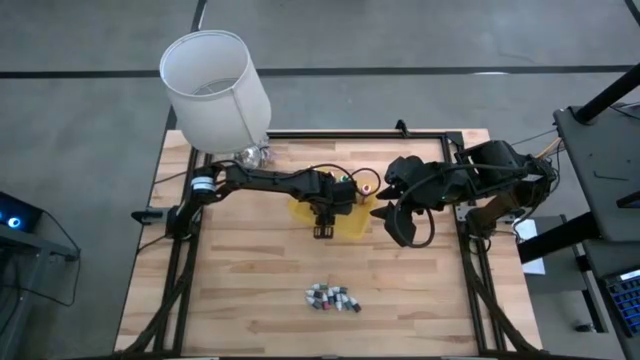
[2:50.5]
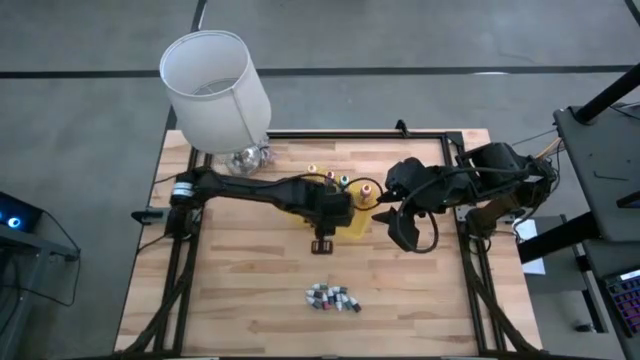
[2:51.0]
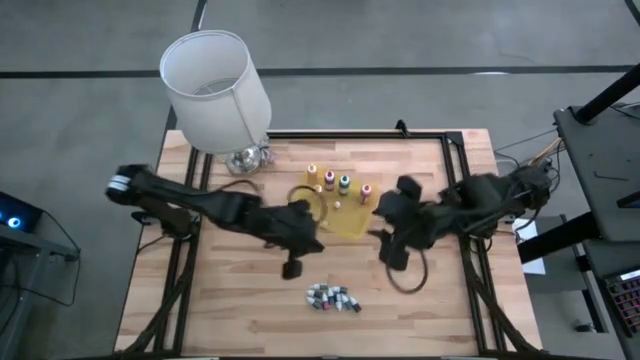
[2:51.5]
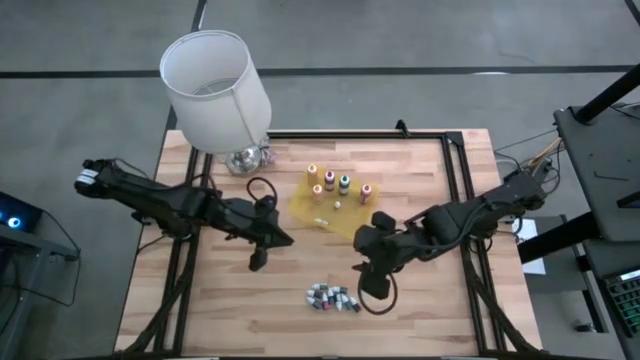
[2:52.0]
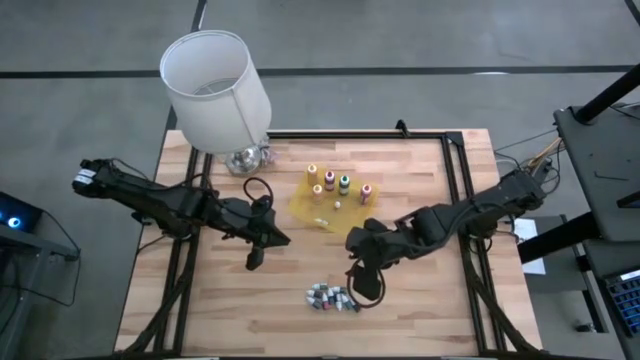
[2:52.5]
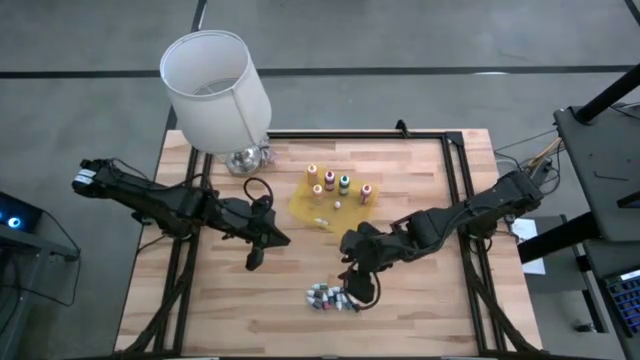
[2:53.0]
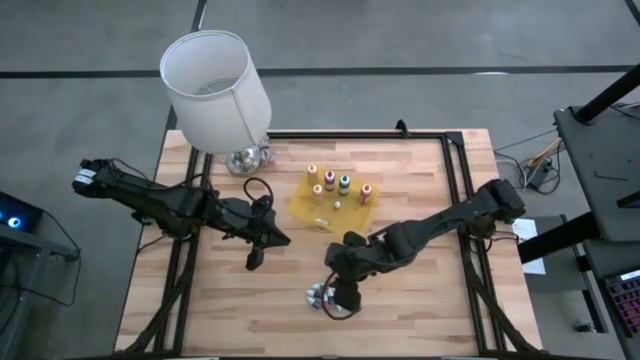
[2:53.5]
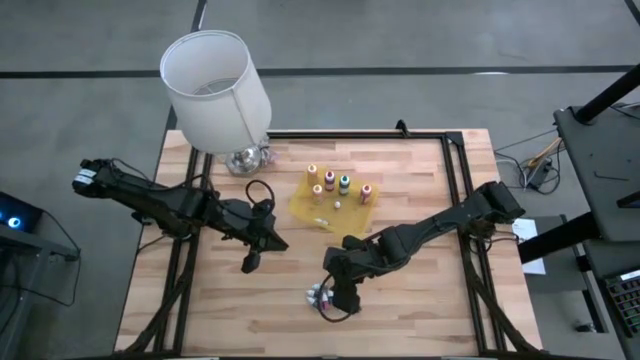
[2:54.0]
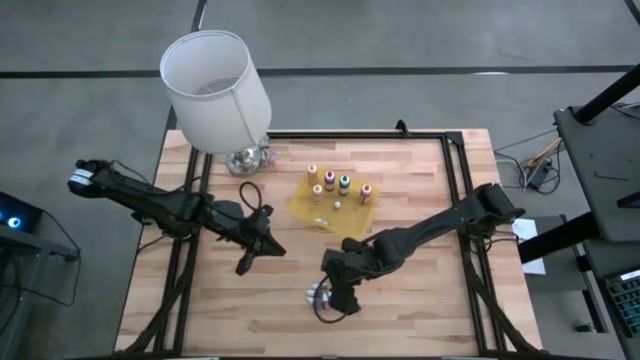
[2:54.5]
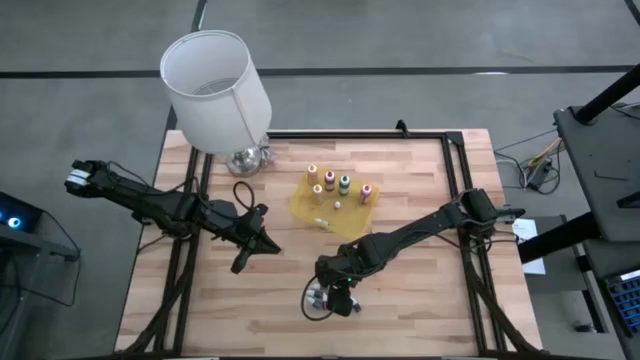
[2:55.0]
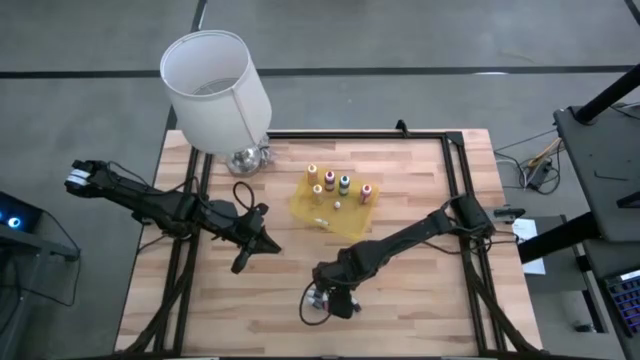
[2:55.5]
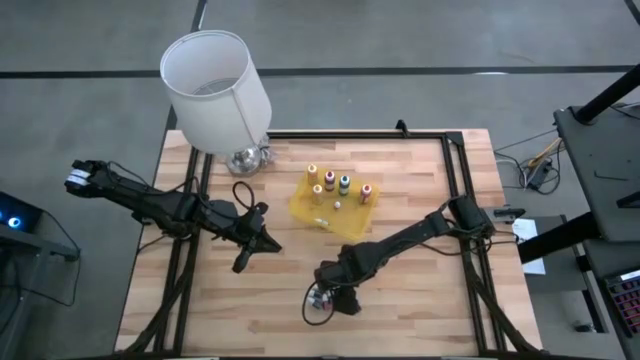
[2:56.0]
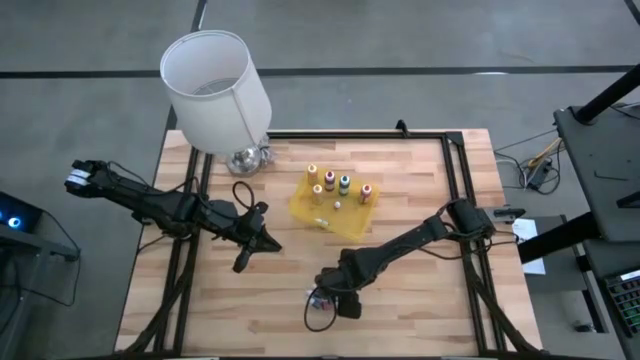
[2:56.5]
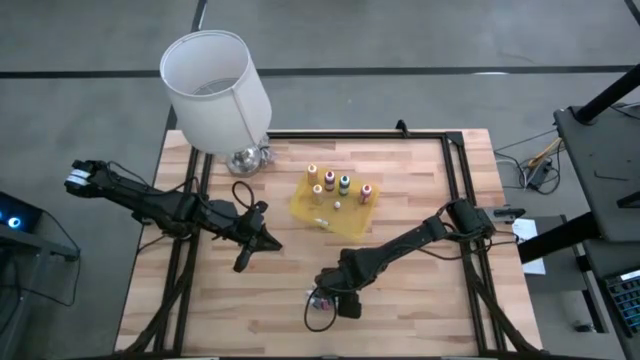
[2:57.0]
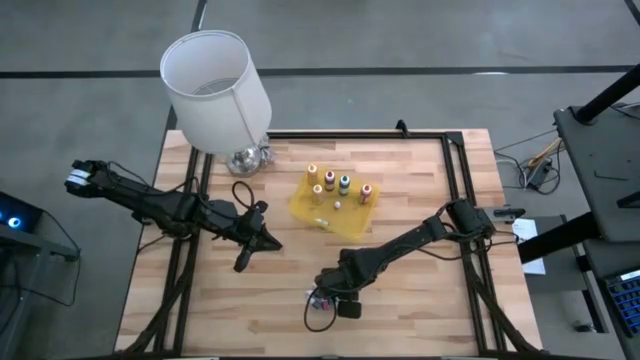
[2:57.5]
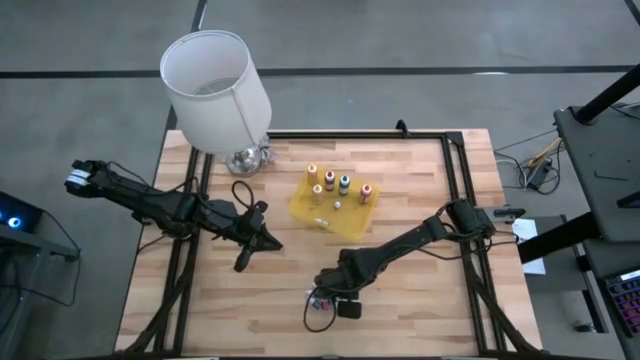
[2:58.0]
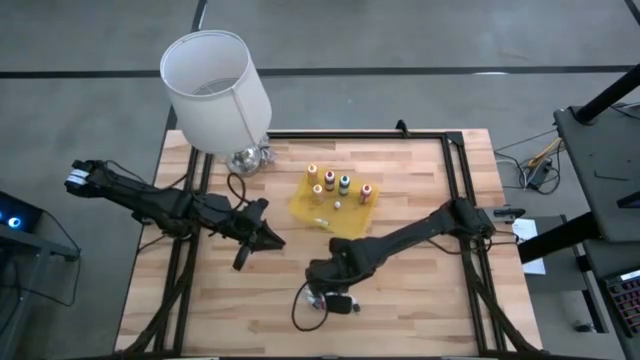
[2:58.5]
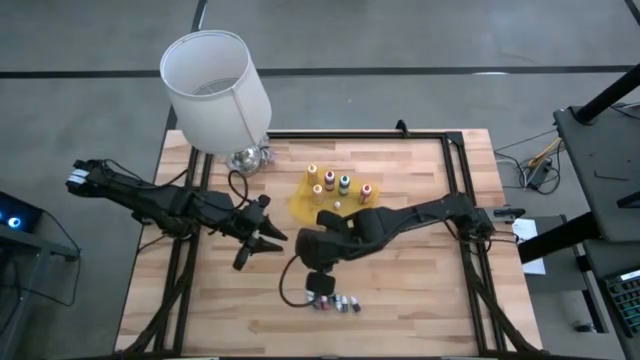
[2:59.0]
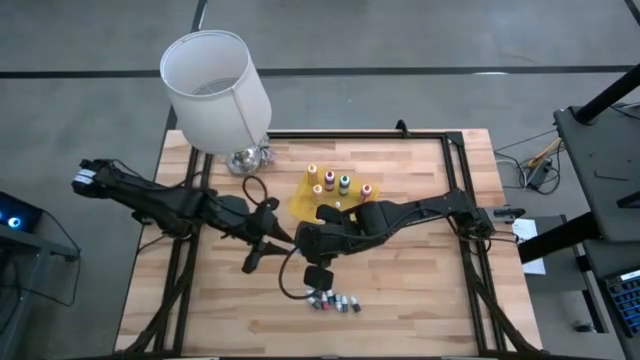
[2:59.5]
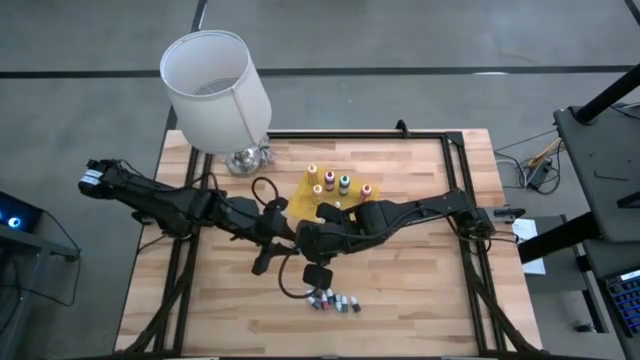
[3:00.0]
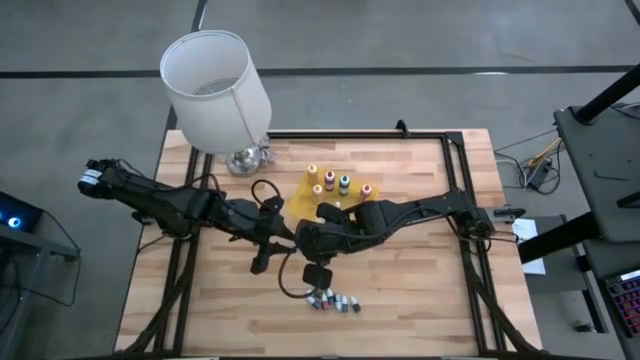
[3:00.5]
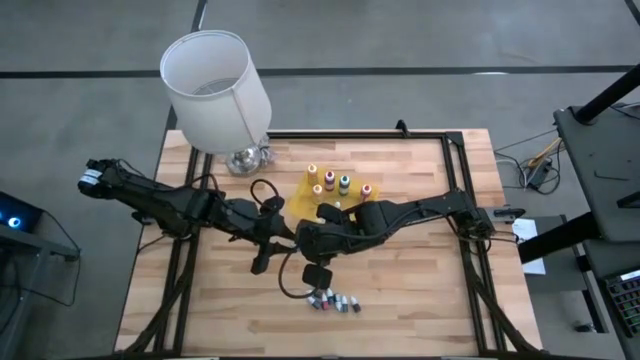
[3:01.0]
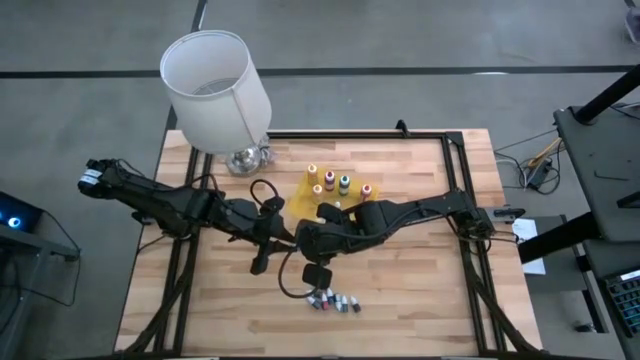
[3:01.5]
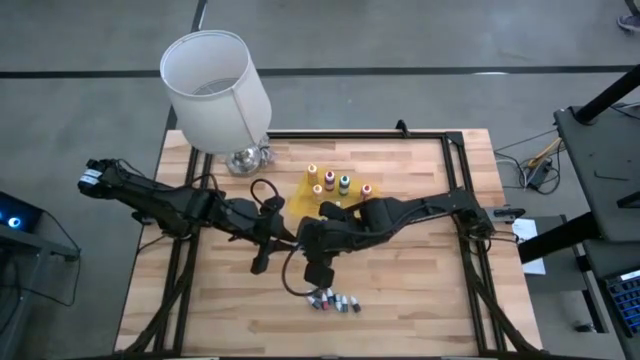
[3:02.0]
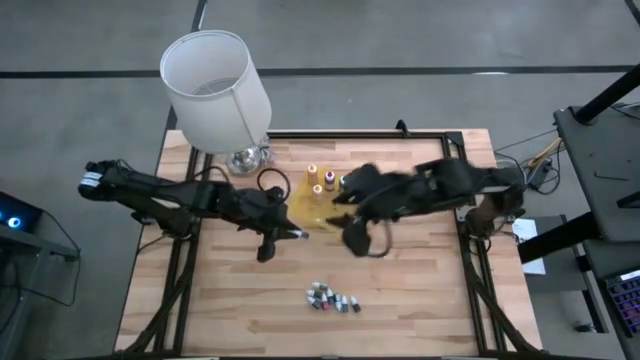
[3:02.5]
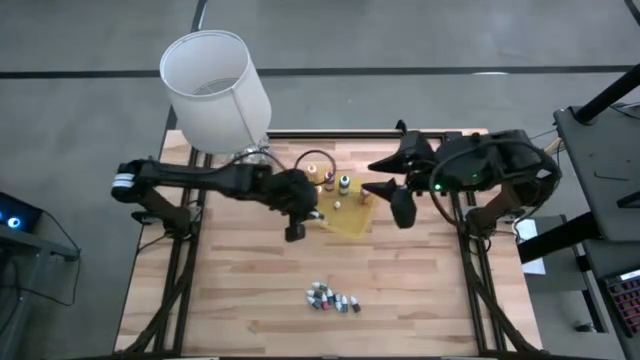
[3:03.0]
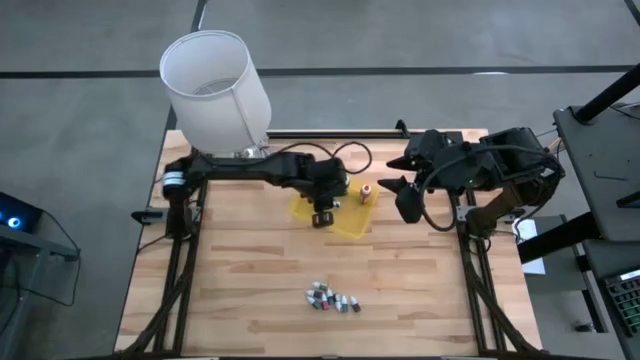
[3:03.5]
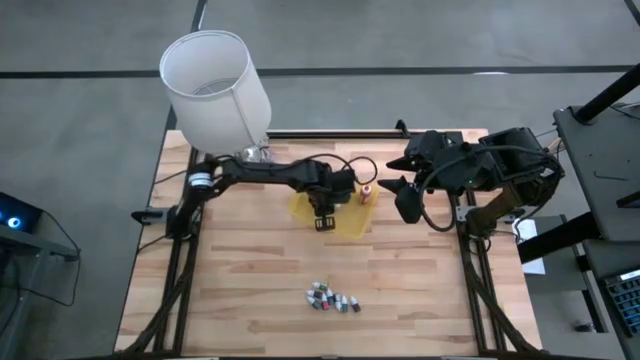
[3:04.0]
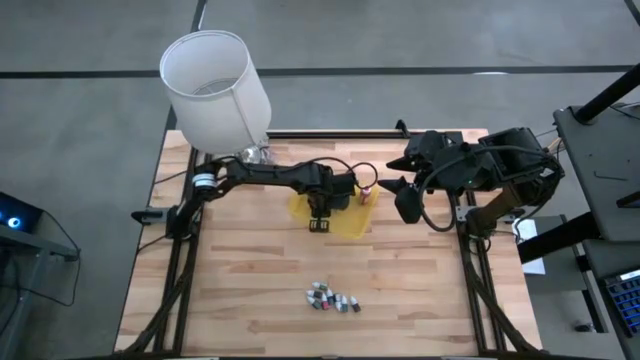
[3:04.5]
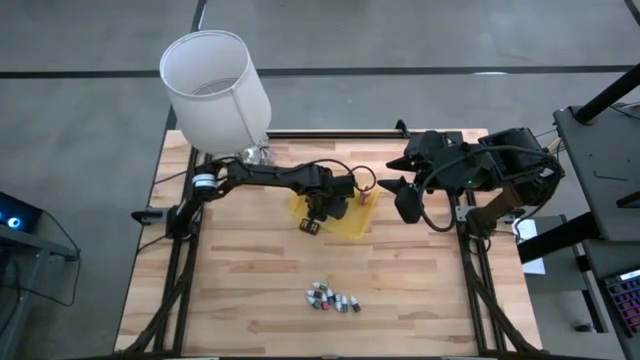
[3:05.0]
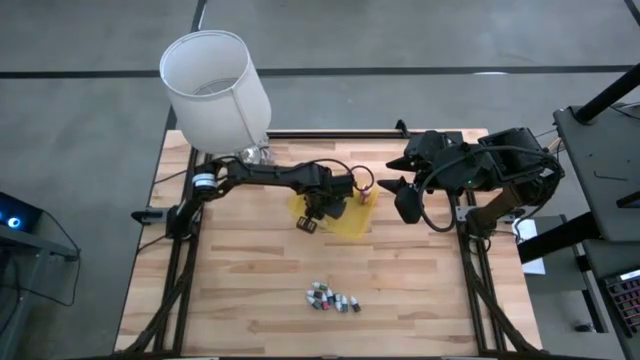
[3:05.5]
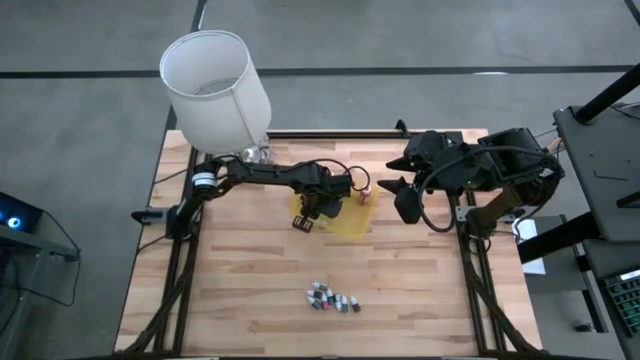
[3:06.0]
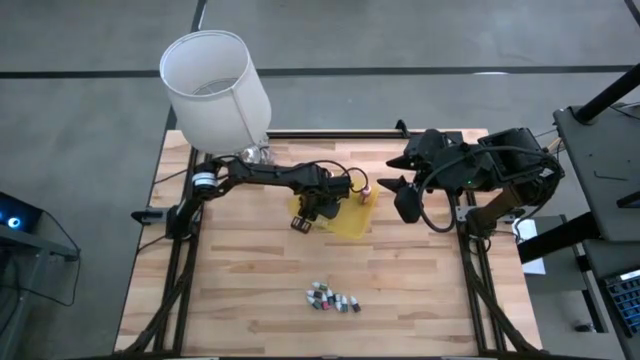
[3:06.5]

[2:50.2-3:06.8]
Task: Pick & Place food coloring
Put the small green food coloring bottle into the yellow bin

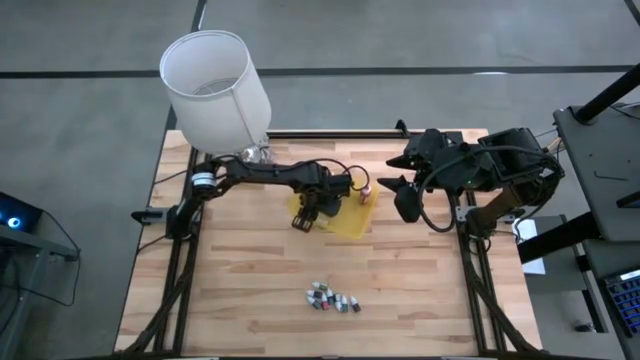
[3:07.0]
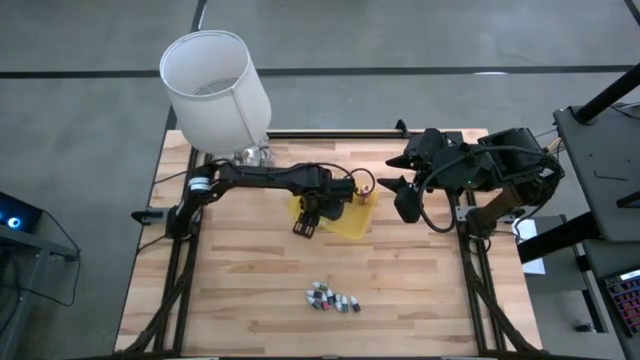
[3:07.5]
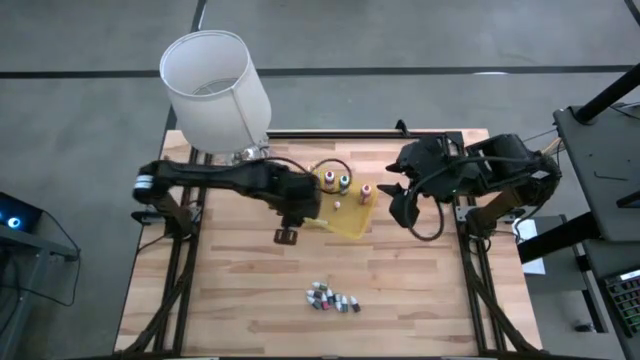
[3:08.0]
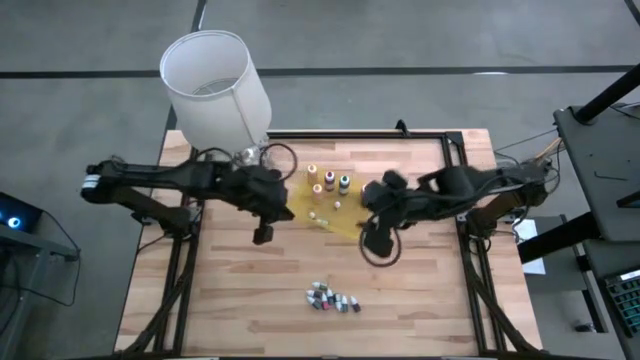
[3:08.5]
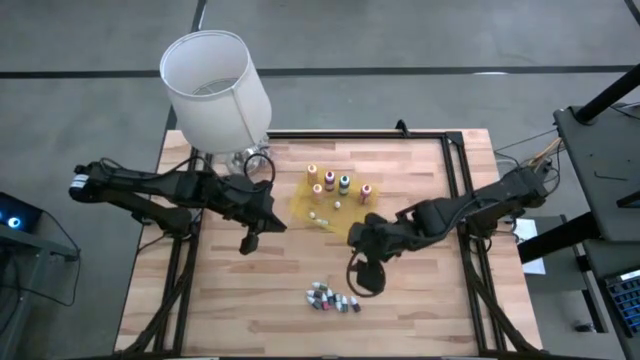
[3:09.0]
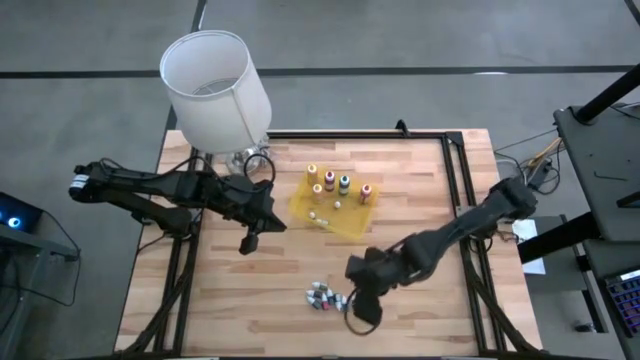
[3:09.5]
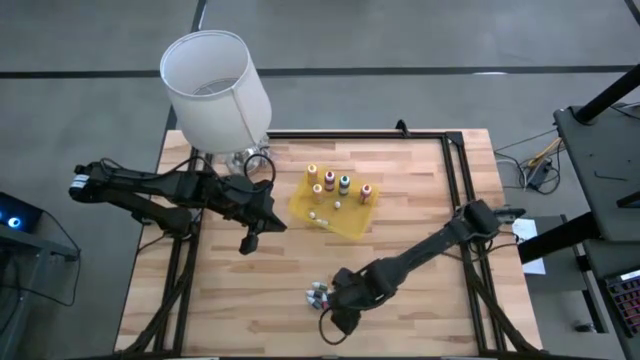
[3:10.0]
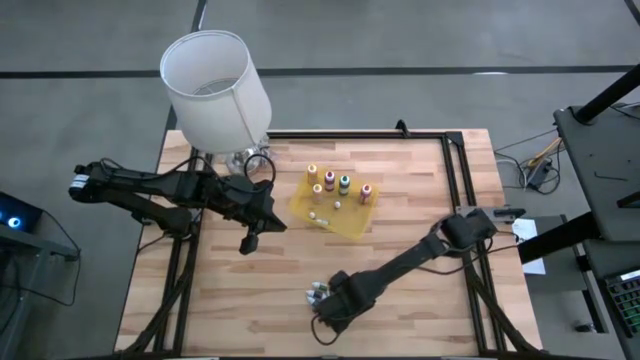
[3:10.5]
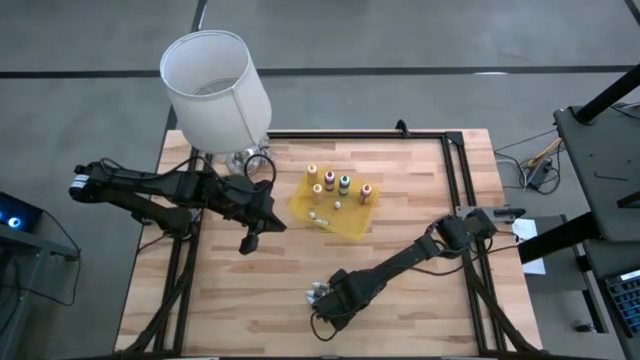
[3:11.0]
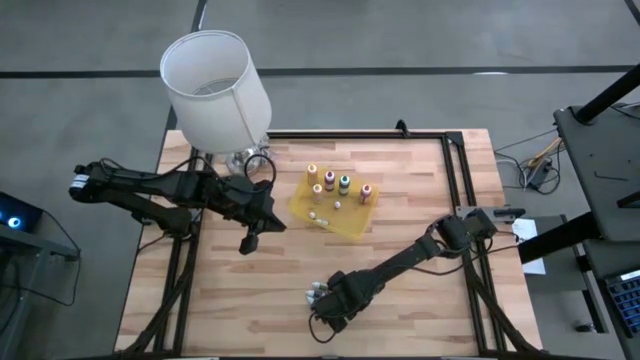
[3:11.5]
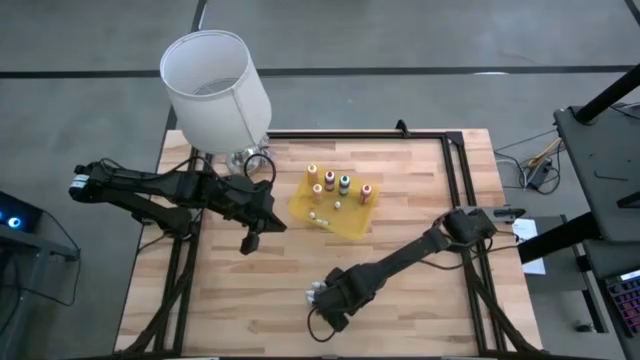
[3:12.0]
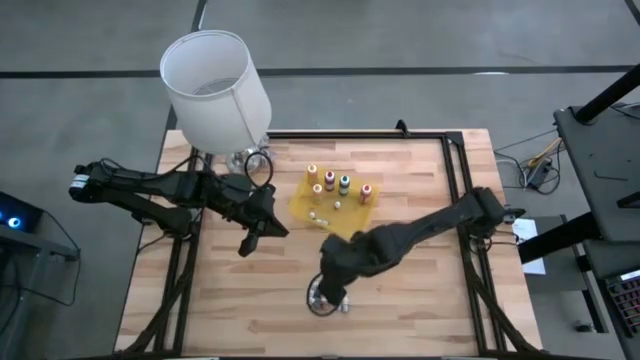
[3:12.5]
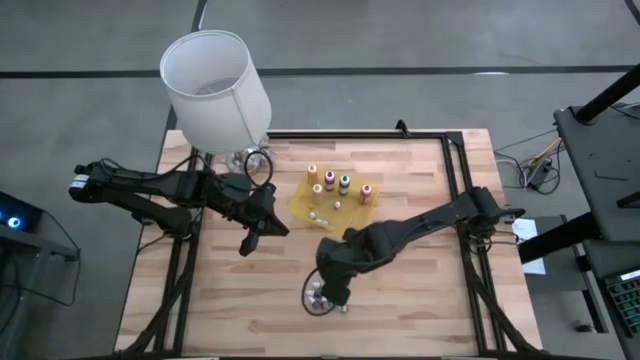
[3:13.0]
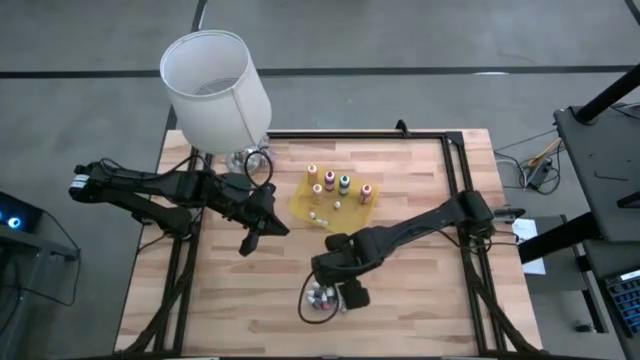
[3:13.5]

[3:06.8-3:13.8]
Put the small purple food coloring bottle into the yellow bin
